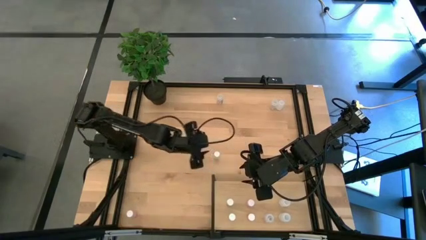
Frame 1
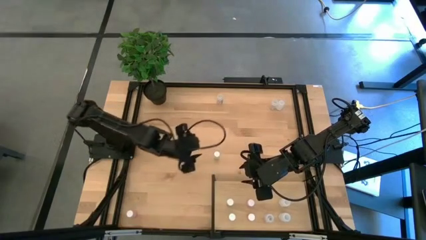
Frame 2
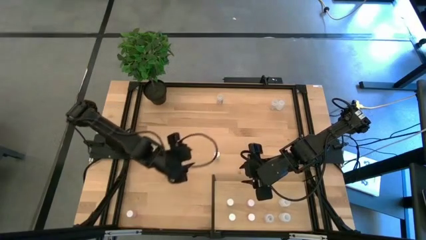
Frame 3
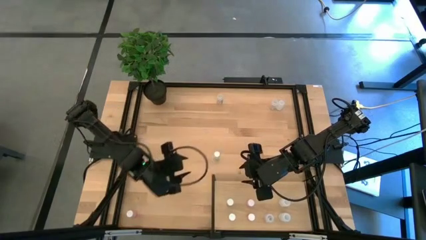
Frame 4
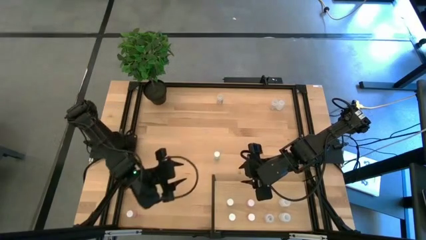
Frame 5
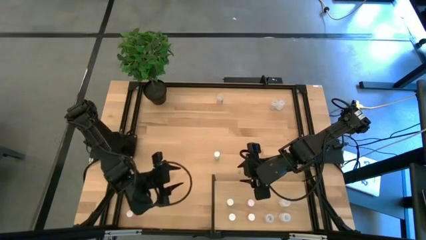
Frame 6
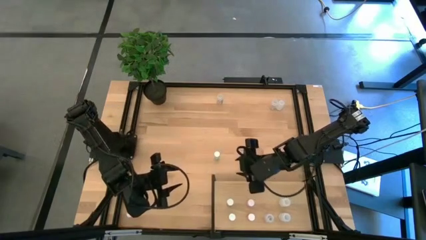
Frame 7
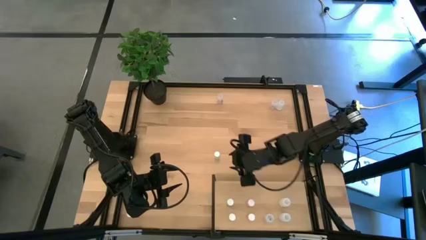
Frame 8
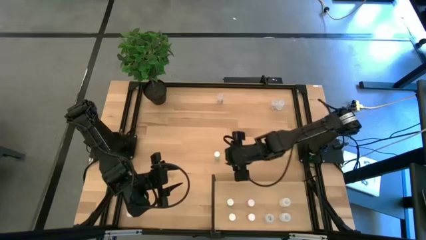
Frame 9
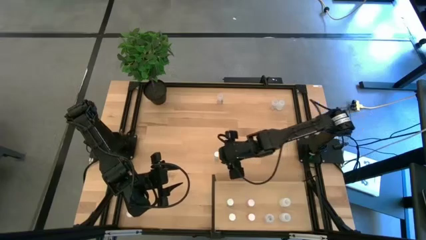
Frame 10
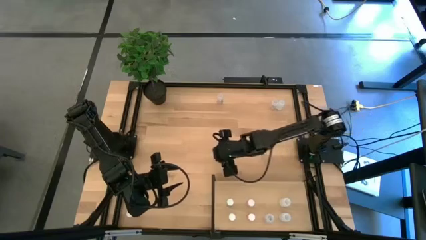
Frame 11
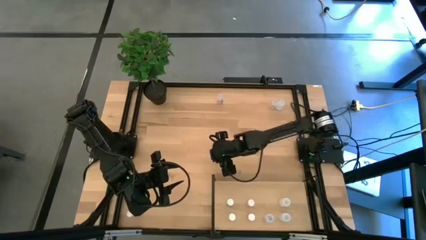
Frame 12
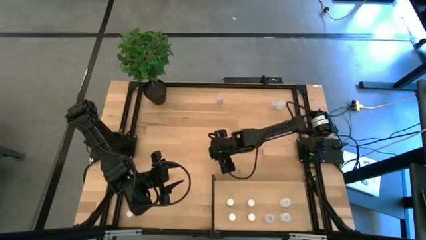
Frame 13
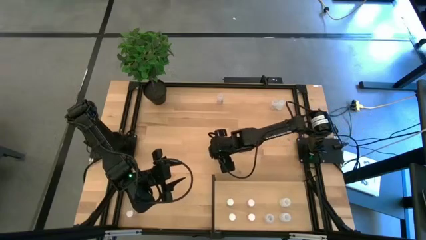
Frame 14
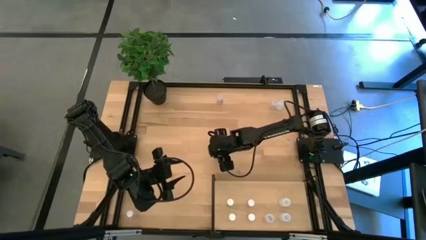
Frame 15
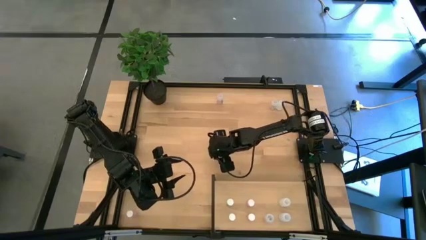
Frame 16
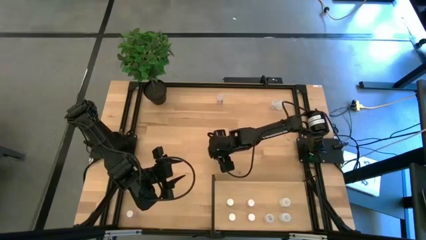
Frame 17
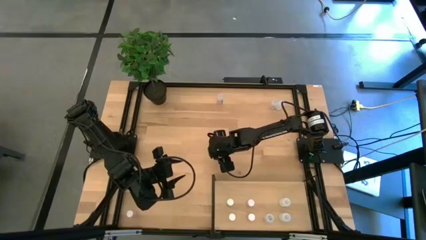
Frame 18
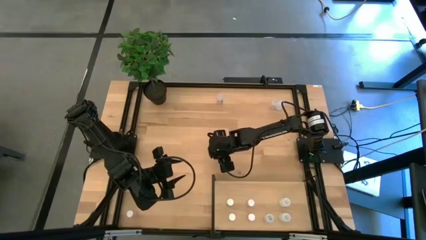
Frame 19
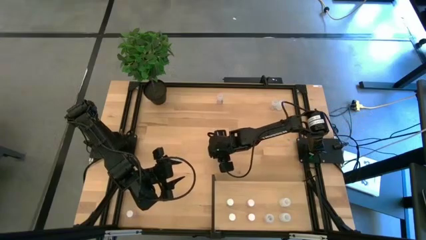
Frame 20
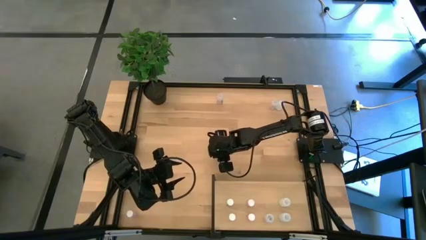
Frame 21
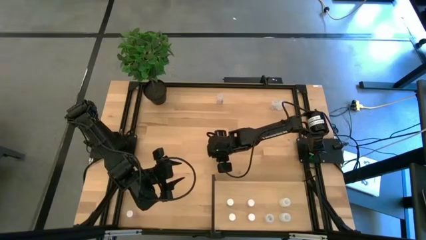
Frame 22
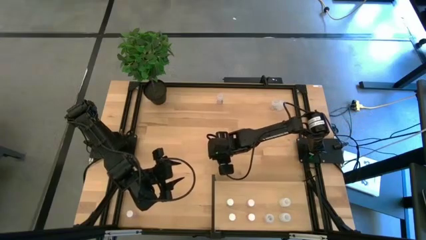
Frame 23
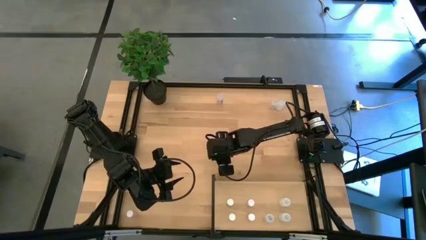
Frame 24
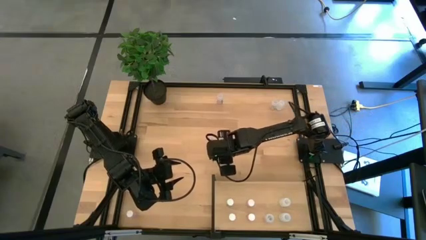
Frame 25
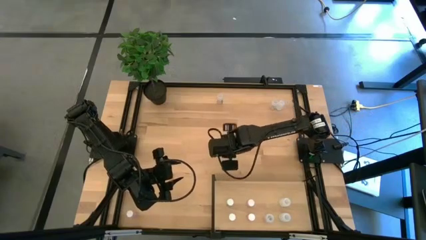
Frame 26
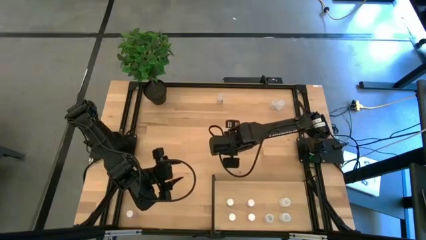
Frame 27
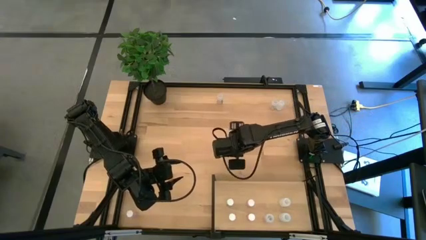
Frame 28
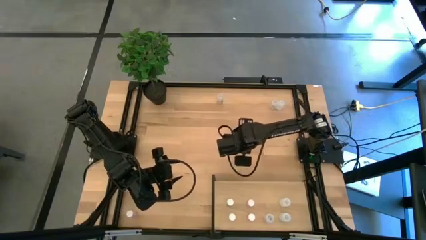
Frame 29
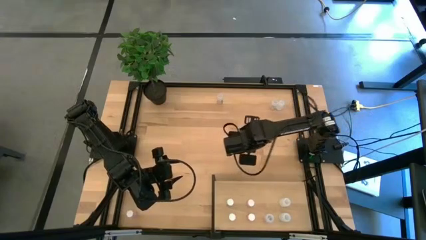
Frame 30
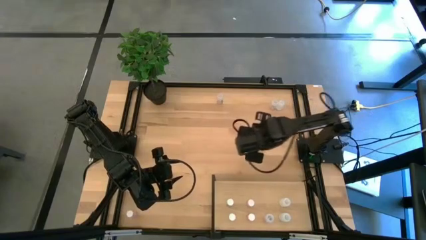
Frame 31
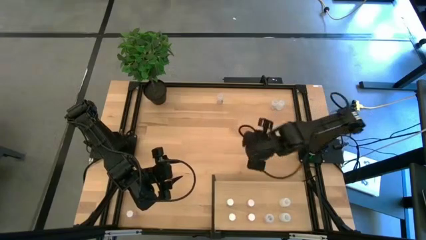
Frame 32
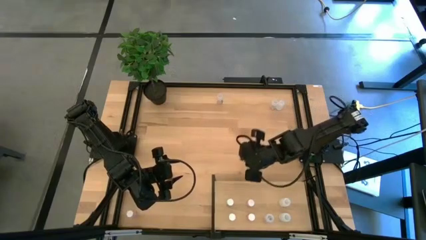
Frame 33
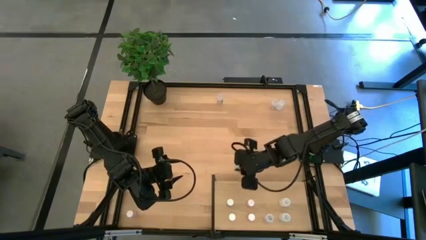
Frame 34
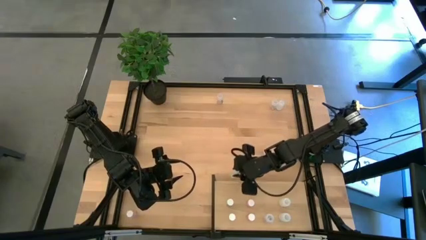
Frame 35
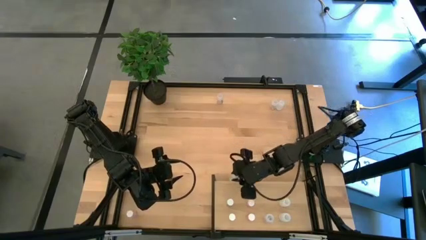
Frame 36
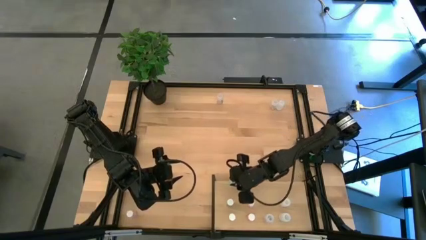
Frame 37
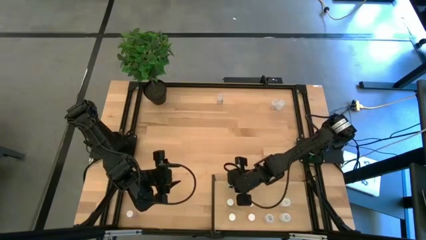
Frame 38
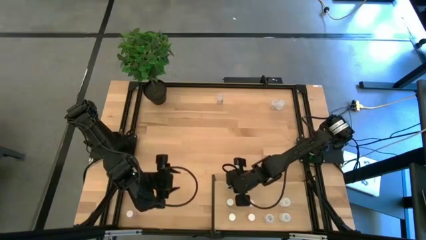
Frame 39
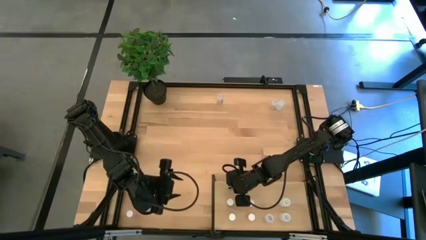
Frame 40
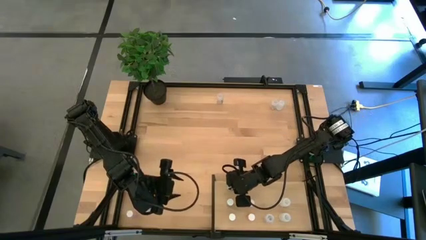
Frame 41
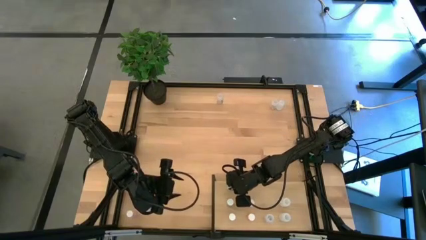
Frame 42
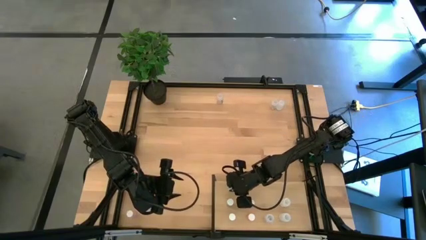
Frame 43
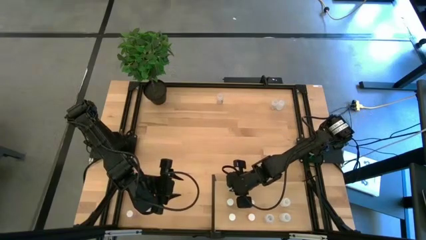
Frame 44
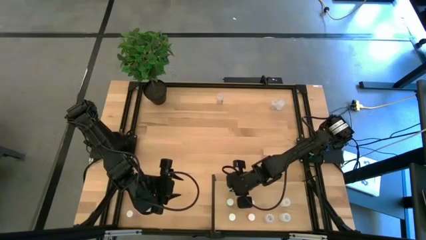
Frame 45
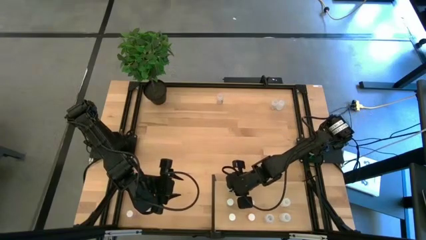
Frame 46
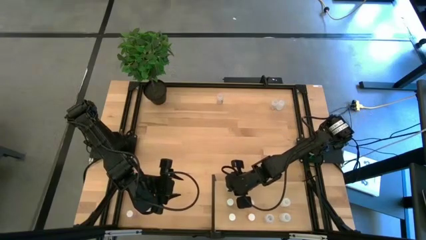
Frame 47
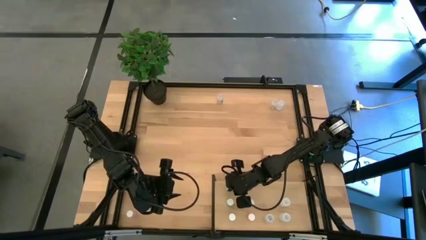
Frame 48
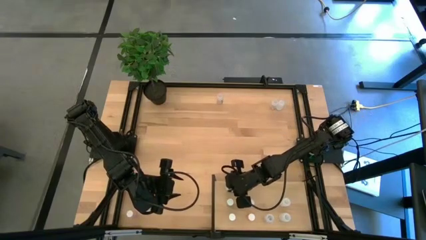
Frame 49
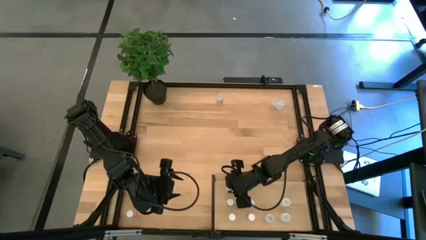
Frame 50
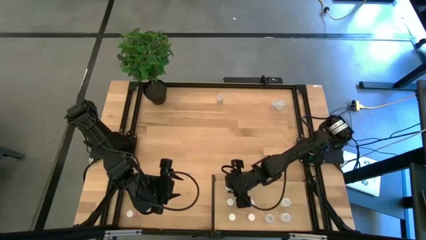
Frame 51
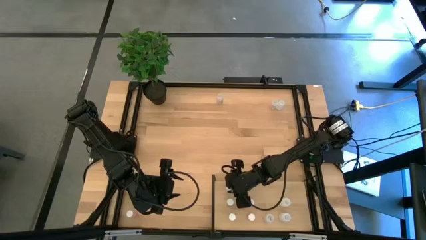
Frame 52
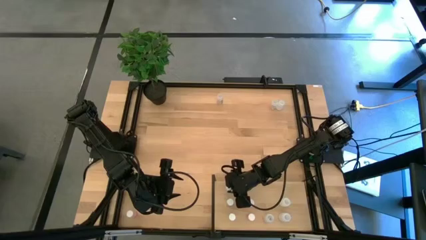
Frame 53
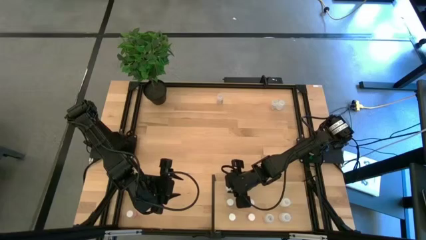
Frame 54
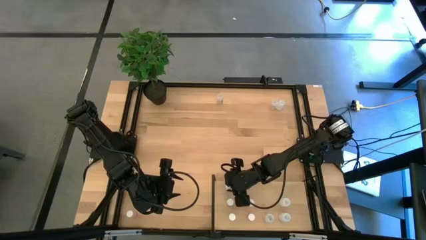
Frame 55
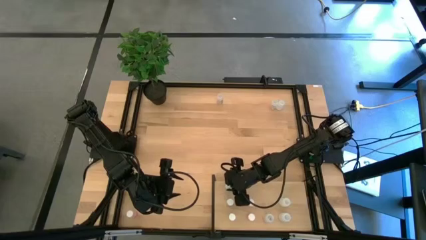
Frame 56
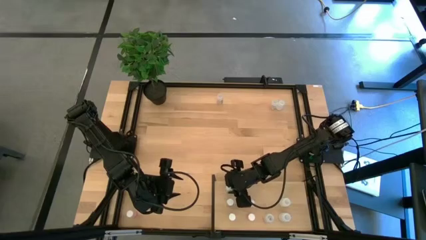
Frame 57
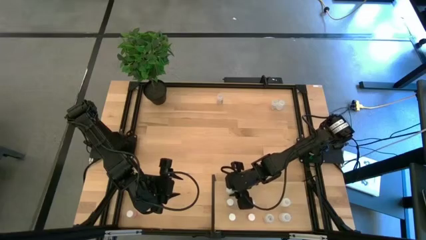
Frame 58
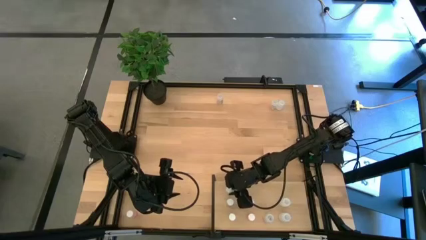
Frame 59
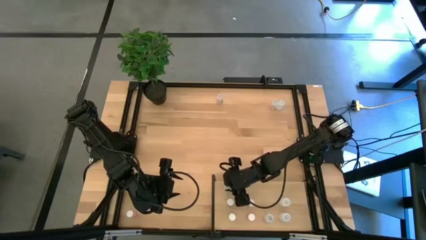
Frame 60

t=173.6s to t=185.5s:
Task: Pick and place medicine bottles onto shelf by color
Put the green pill bottle on the shelf aligned with the other green pill bottles

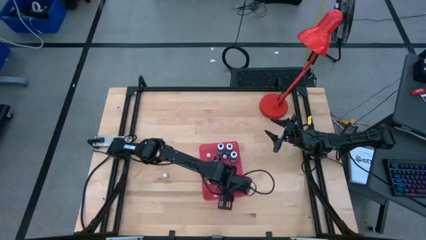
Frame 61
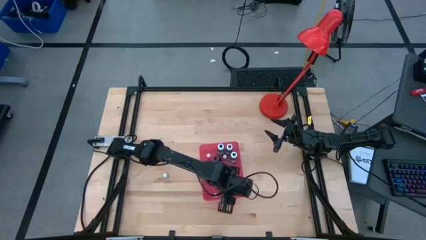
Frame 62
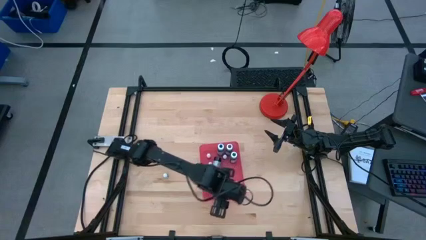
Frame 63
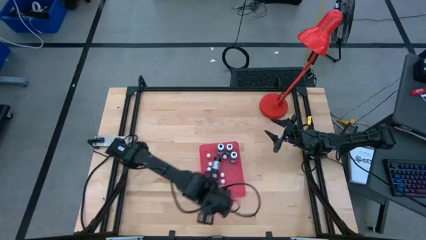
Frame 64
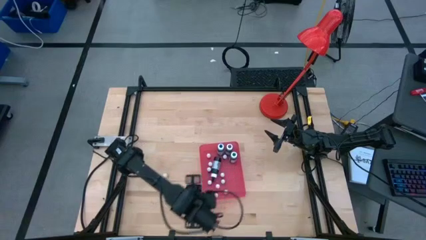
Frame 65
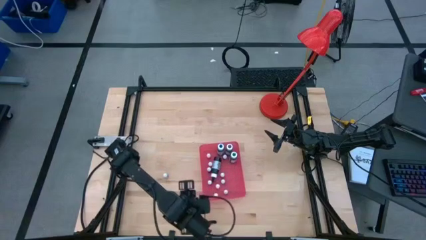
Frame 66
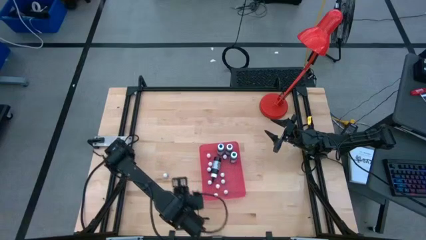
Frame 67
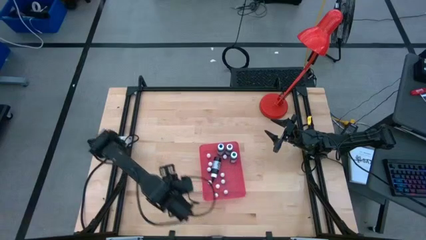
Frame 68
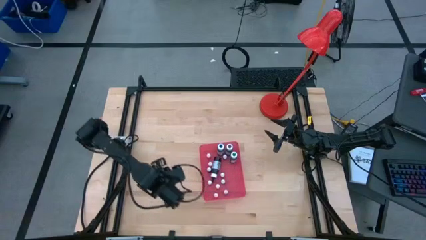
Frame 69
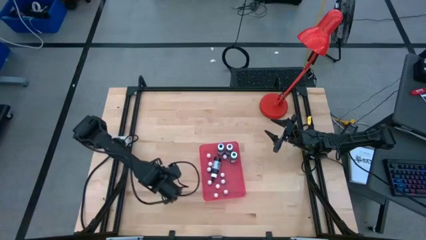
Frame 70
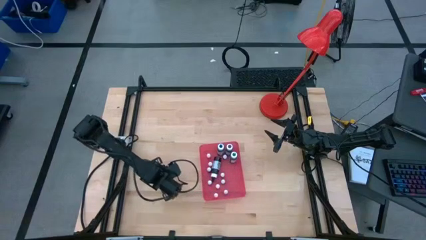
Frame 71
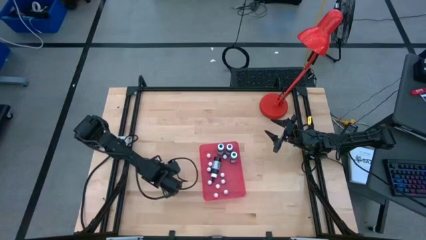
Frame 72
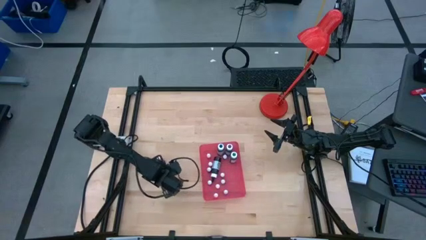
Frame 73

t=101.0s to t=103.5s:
Task: Pick & Place food coloring
Put the small purple food coloring bottle into the red bin
